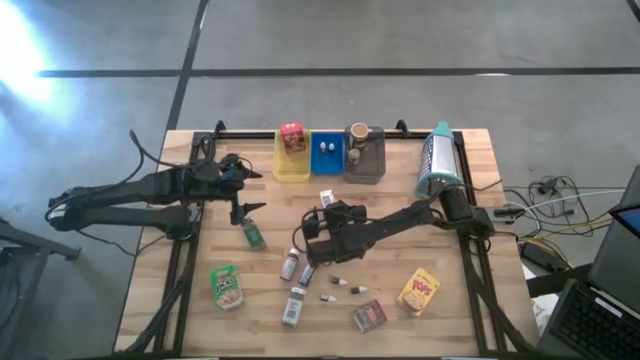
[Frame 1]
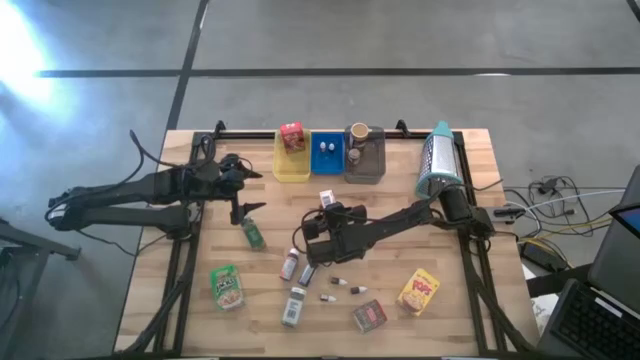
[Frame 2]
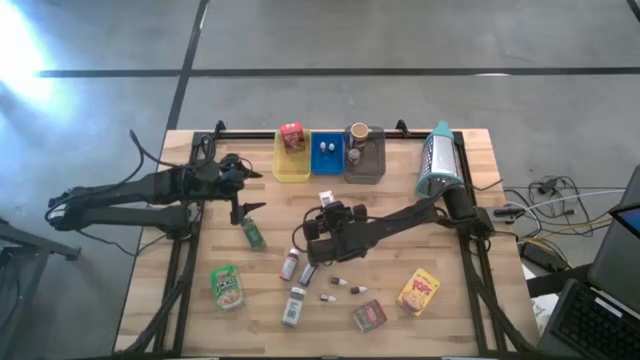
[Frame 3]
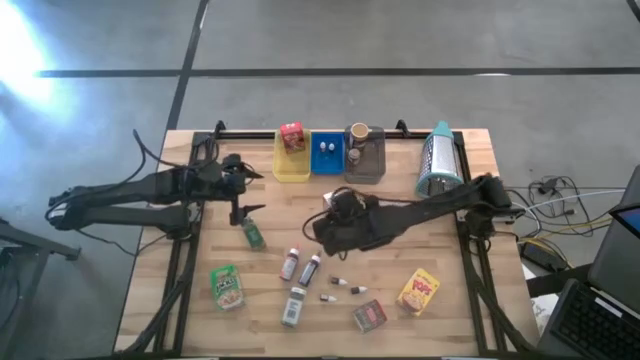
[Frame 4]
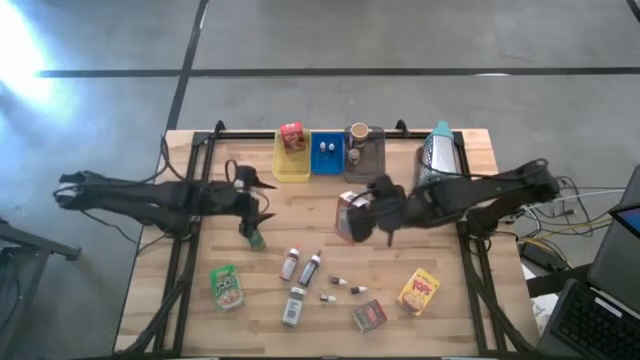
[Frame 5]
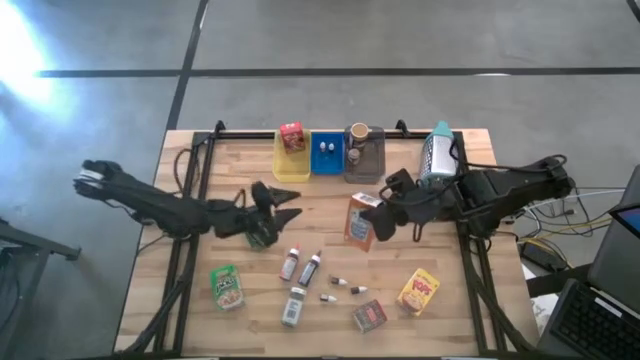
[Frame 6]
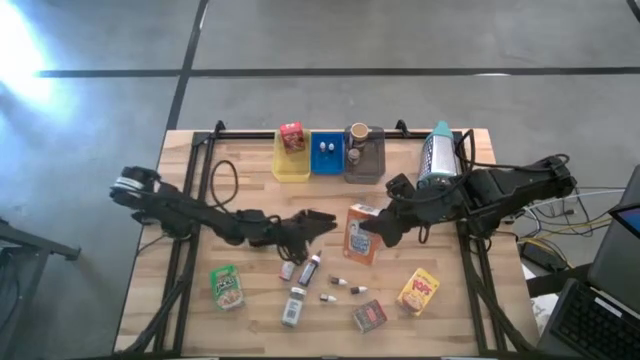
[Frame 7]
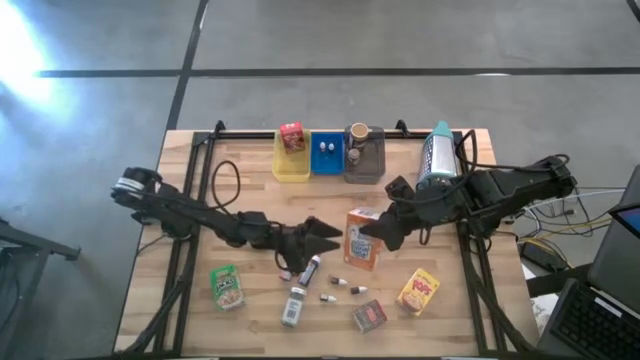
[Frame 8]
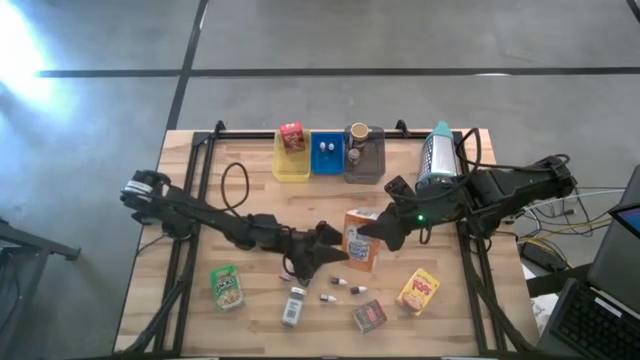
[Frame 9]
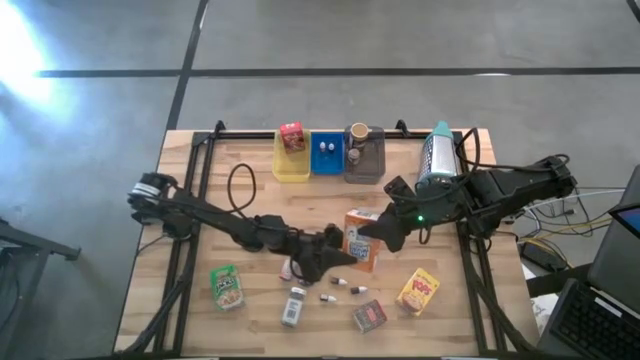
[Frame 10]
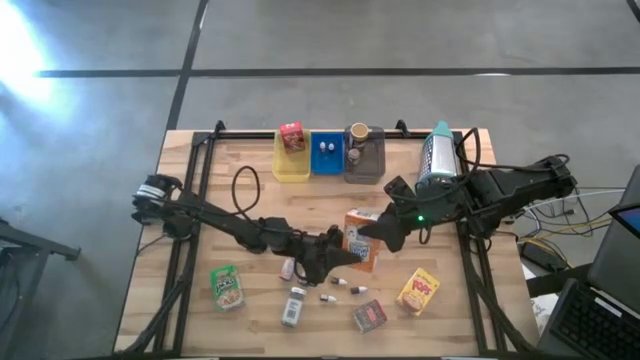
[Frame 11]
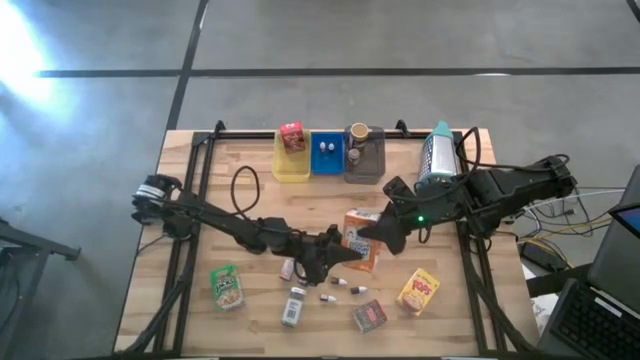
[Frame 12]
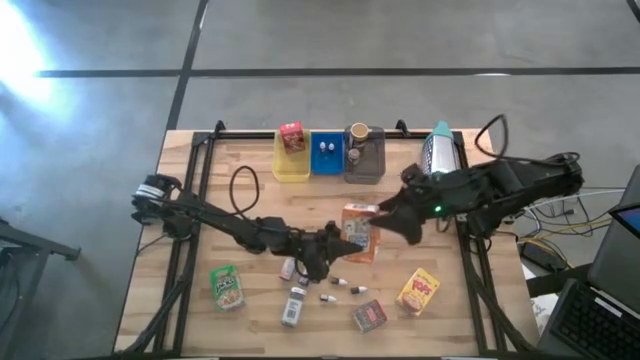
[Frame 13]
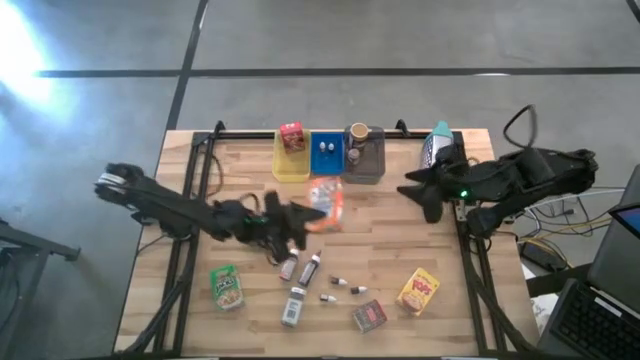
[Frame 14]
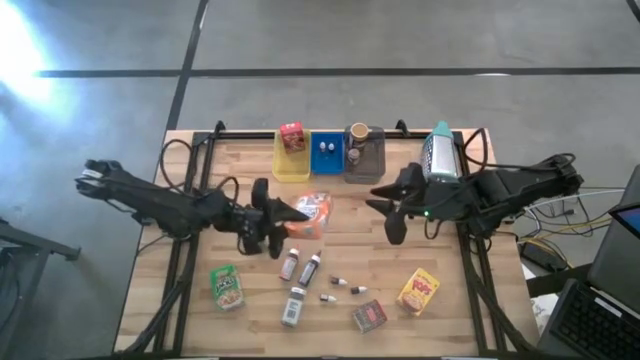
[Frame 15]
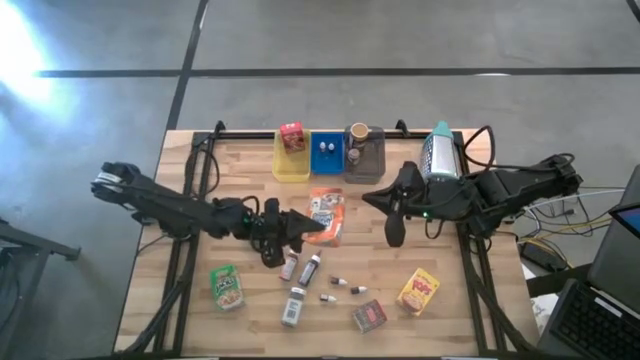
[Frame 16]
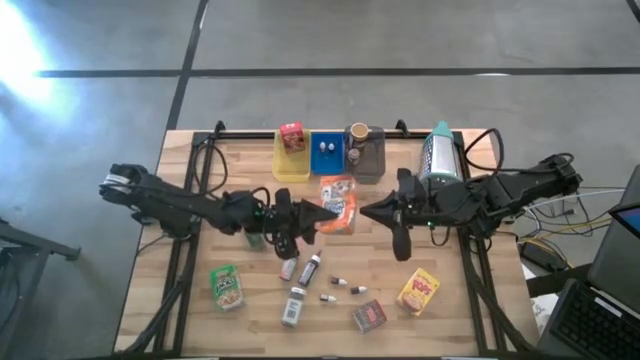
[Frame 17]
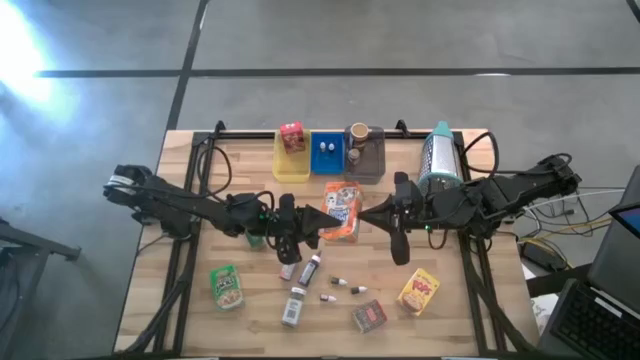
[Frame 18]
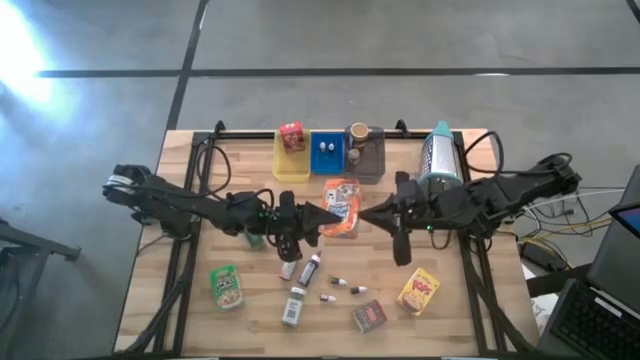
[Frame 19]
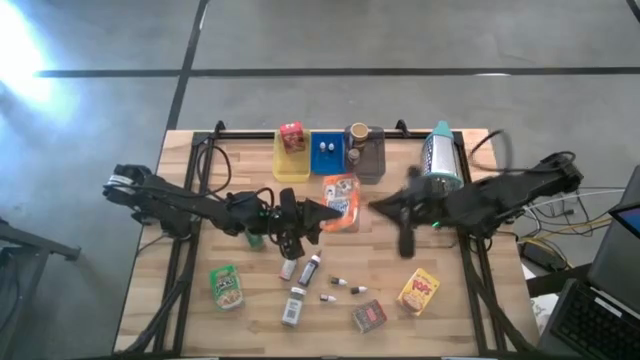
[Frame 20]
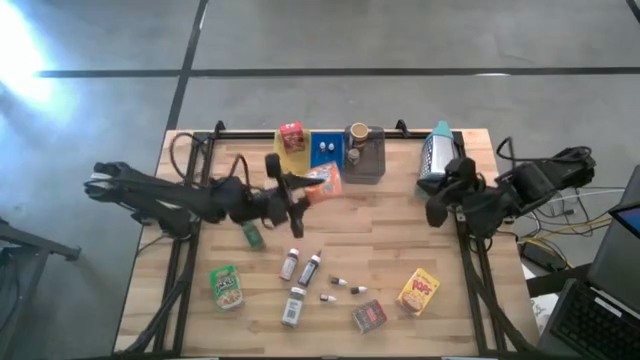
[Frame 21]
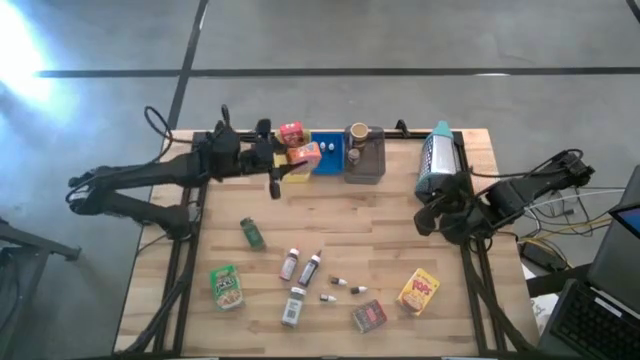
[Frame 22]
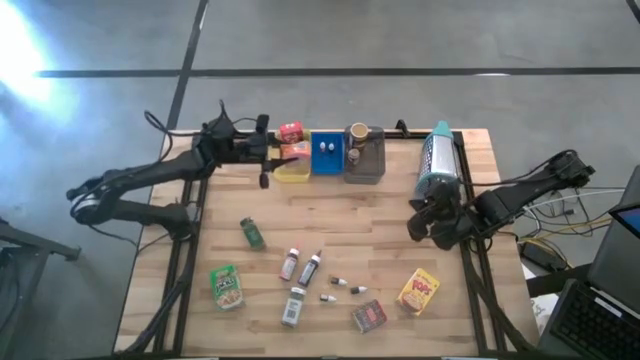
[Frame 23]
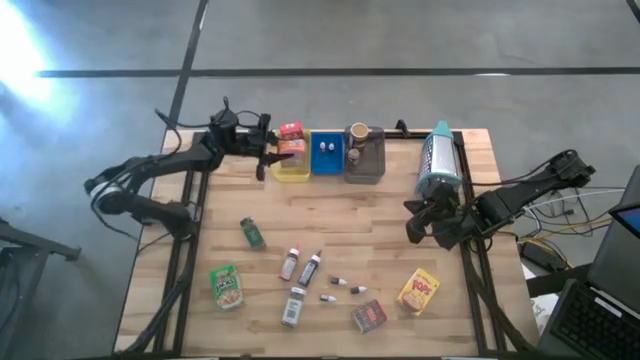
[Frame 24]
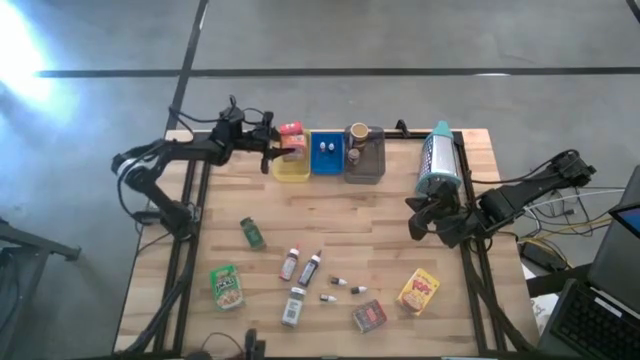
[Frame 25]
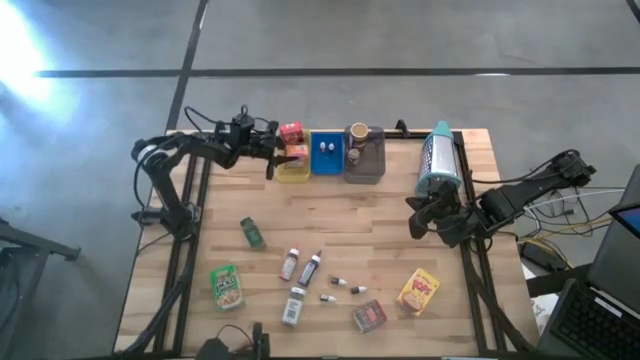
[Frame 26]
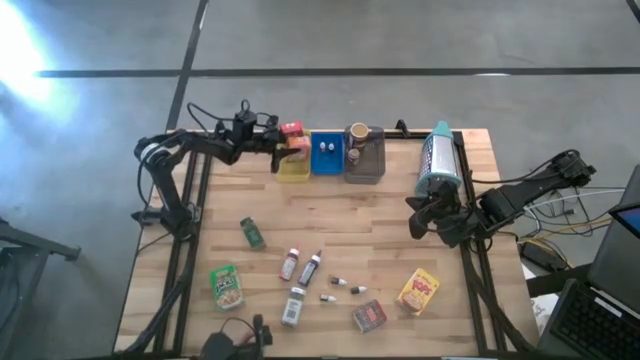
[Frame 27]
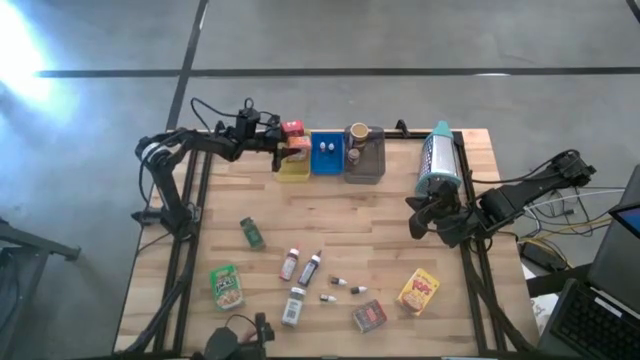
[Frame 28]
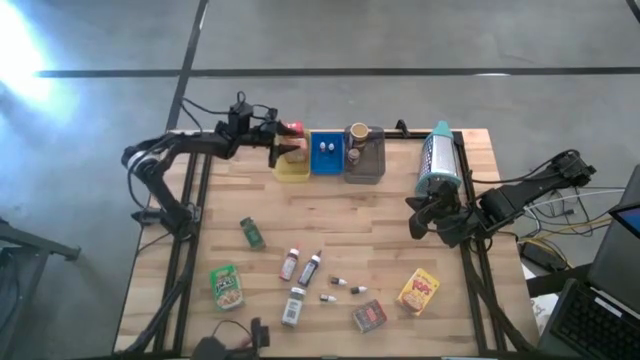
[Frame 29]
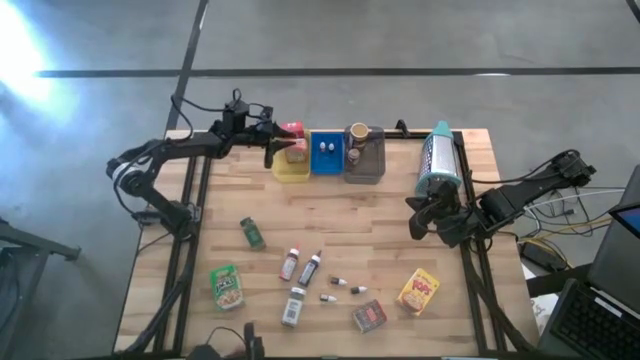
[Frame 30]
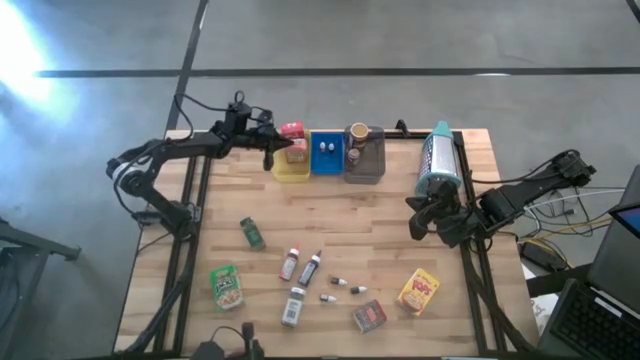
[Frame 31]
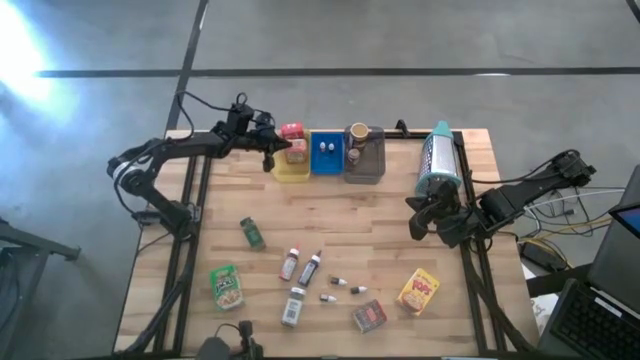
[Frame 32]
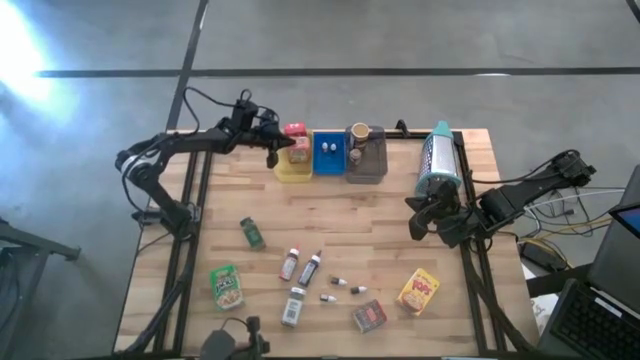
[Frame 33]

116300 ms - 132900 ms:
Task: Pick & Place Kitchen Items
Put the orange cereal box into the yellow bin

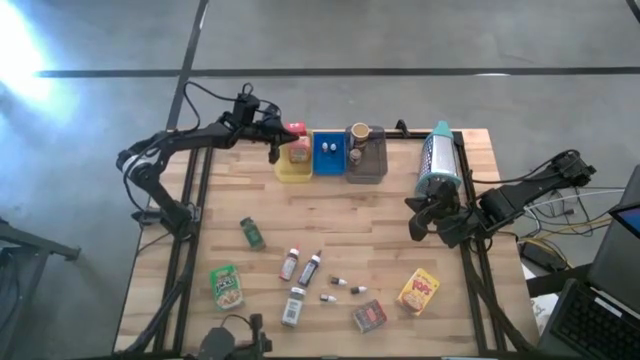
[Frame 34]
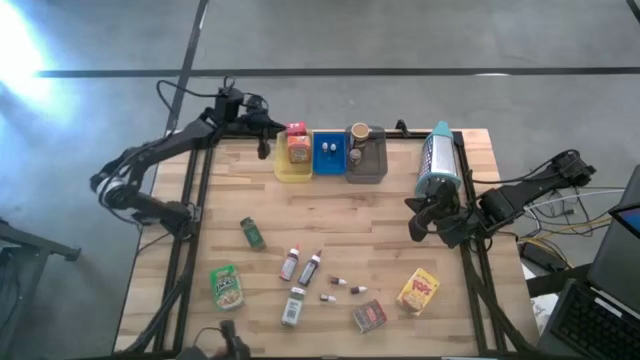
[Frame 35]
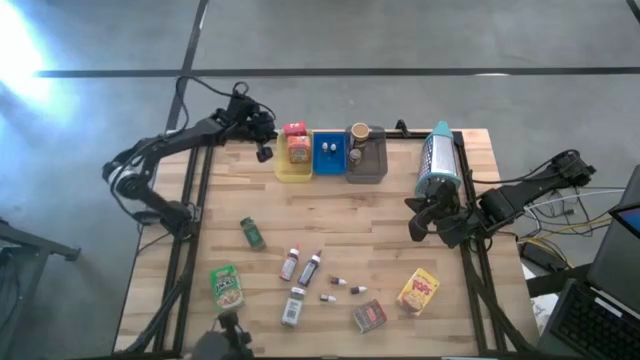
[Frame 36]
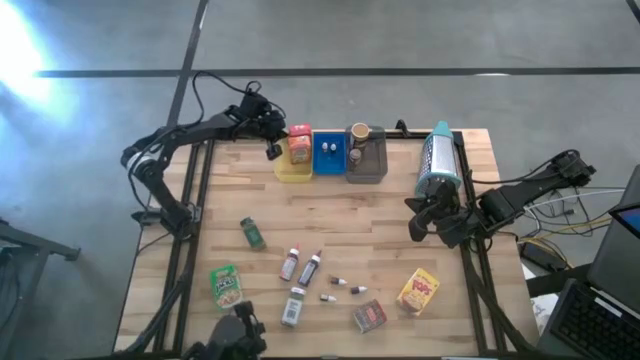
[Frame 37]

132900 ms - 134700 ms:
Adjust the red cereal box in the yellow bin

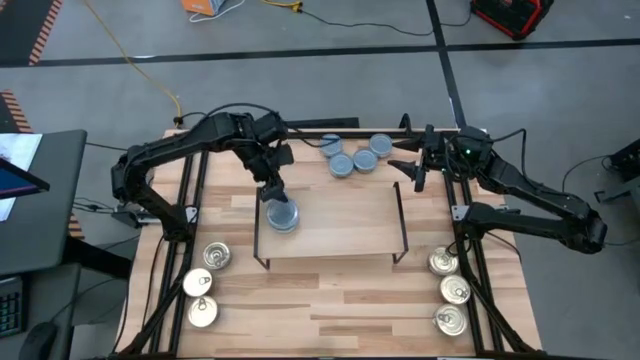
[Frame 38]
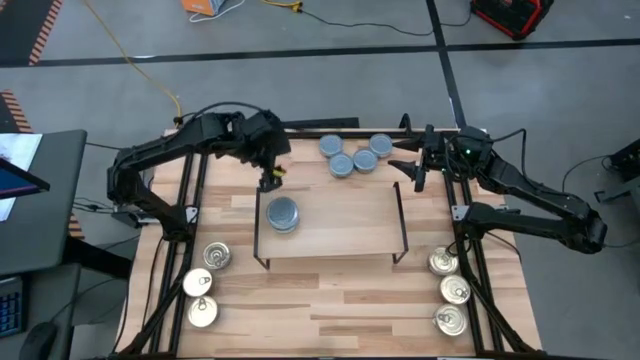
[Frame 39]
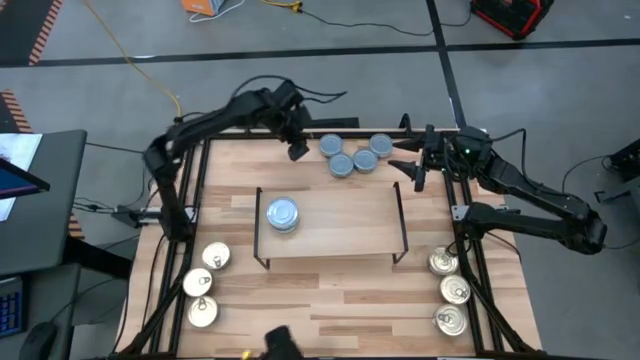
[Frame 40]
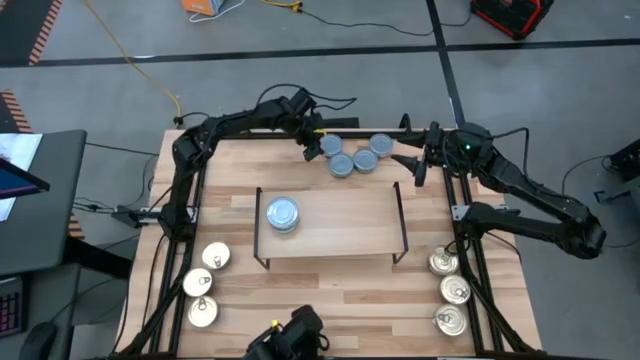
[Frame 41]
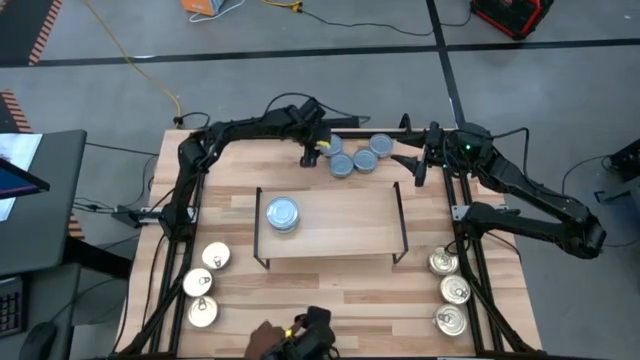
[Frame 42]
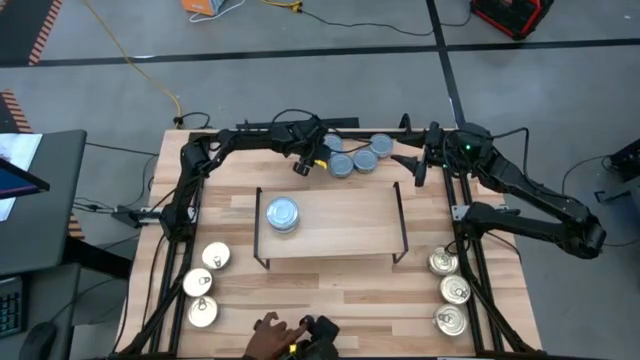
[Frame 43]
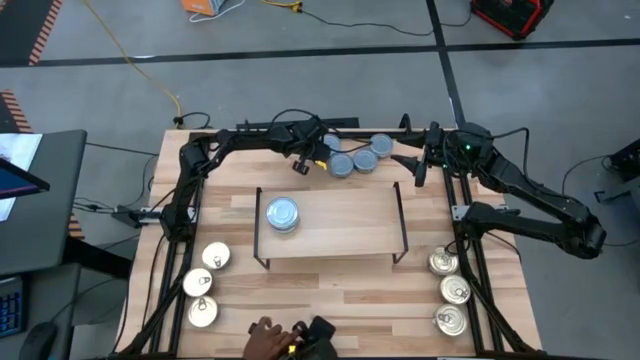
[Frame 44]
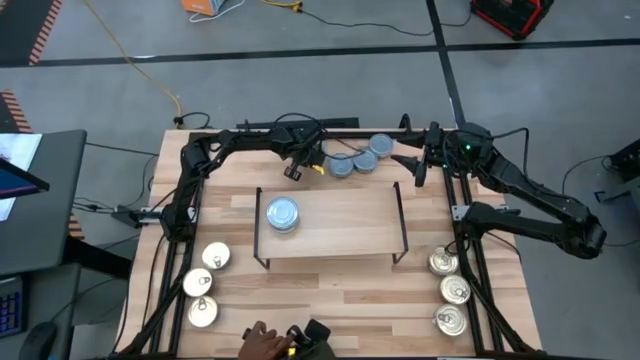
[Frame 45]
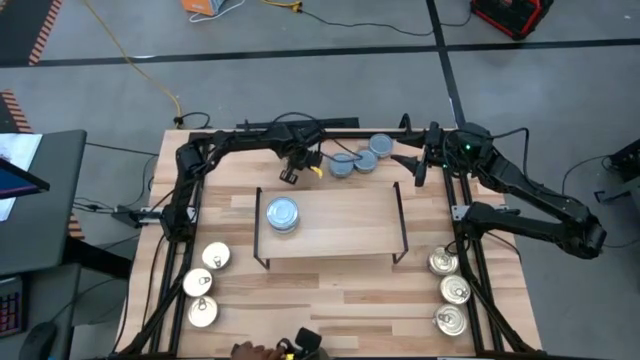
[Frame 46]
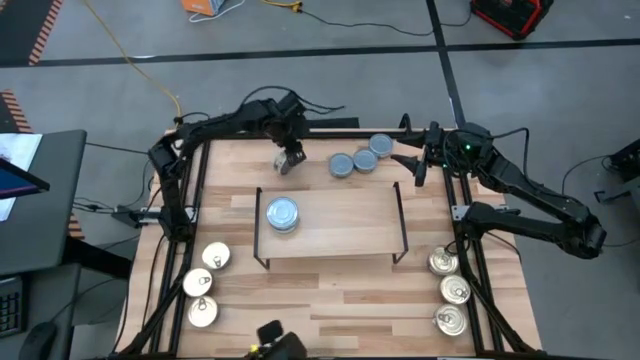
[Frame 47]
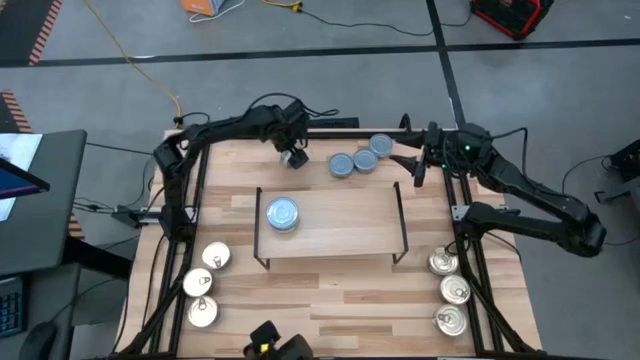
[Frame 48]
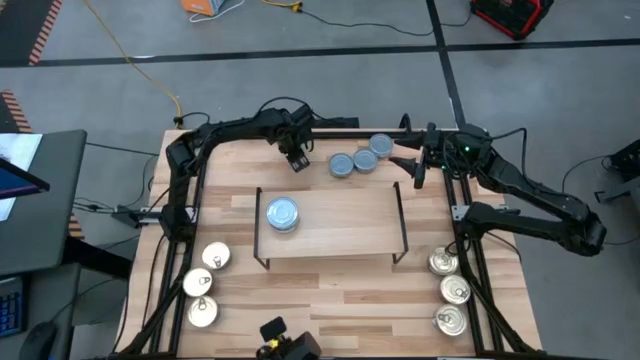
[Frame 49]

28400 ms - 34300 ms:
Task: Stack canned seafood by type on shelf
Stack the green tuna can on top of the green tuna can on the shelf
